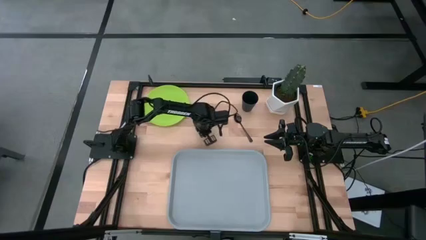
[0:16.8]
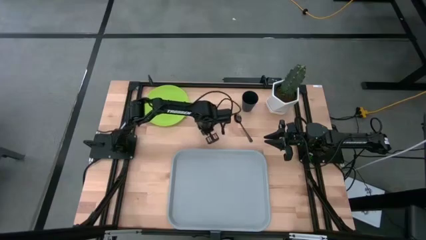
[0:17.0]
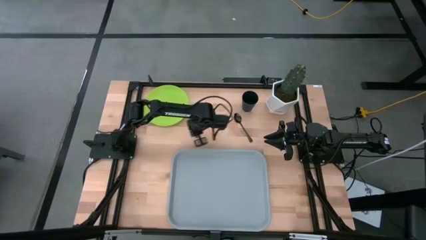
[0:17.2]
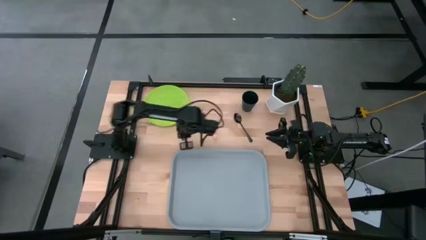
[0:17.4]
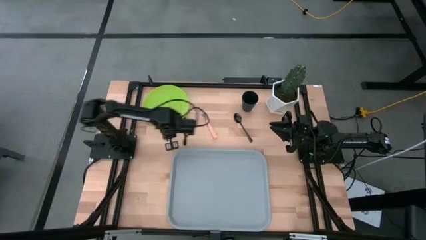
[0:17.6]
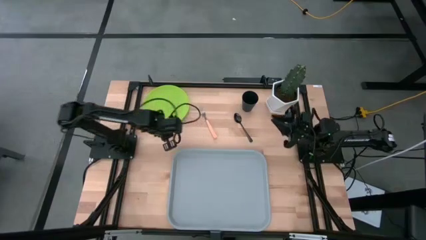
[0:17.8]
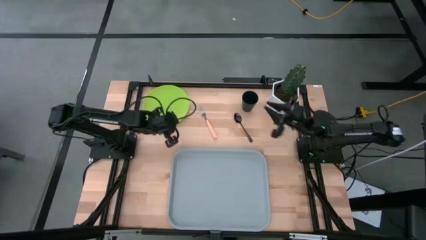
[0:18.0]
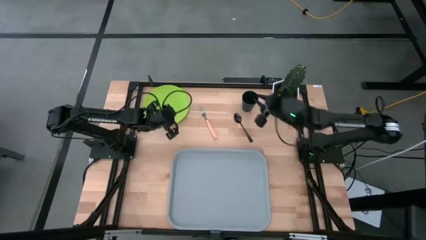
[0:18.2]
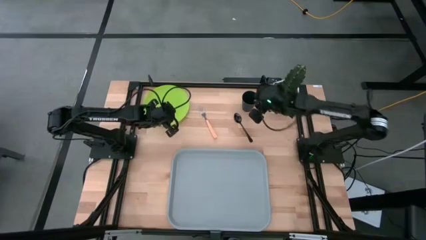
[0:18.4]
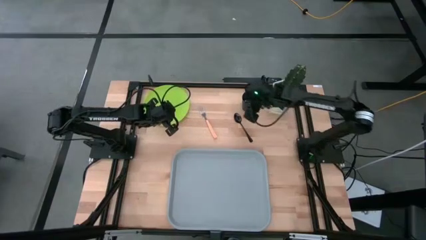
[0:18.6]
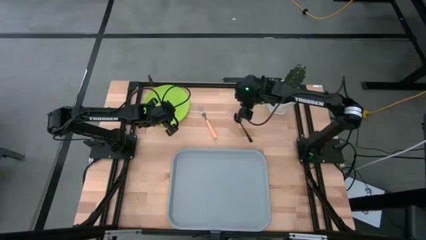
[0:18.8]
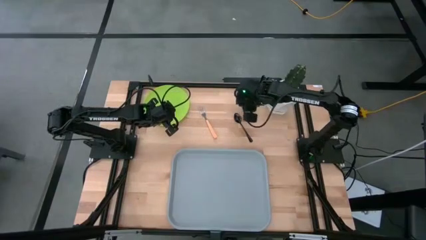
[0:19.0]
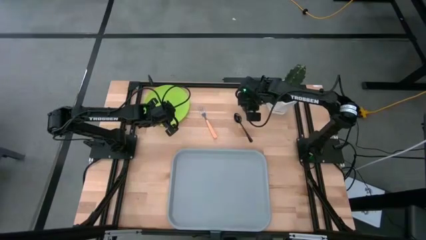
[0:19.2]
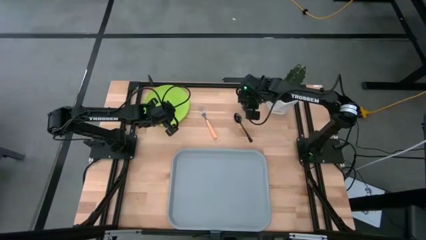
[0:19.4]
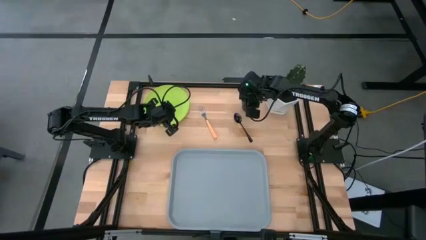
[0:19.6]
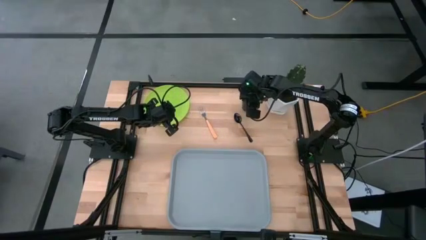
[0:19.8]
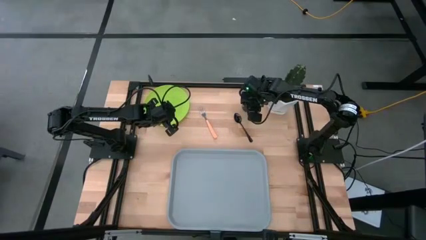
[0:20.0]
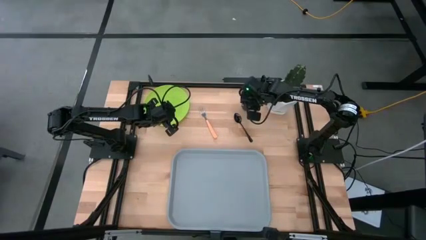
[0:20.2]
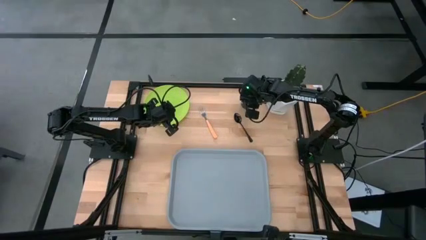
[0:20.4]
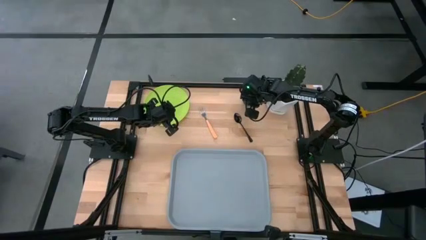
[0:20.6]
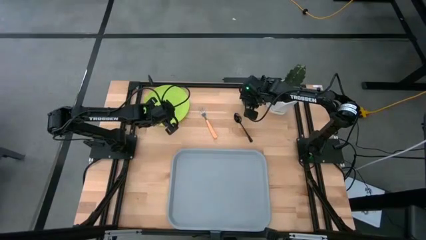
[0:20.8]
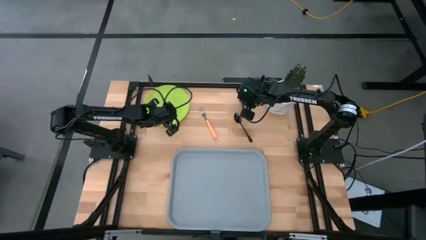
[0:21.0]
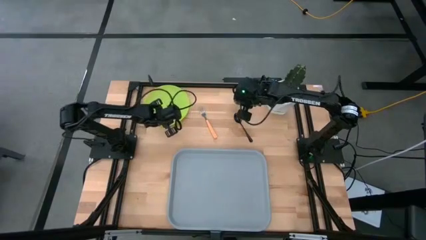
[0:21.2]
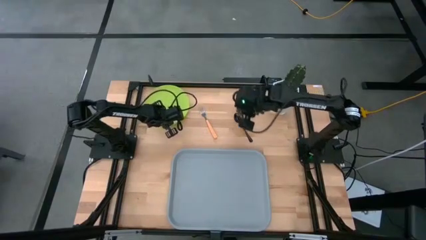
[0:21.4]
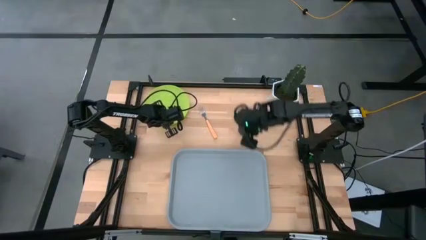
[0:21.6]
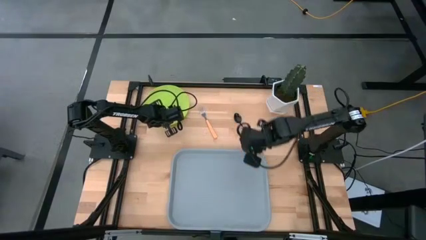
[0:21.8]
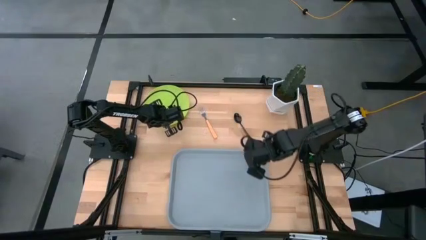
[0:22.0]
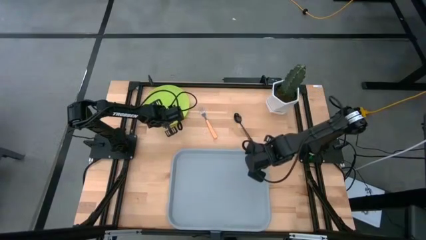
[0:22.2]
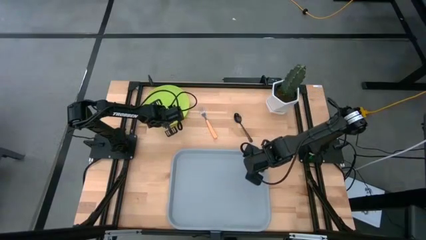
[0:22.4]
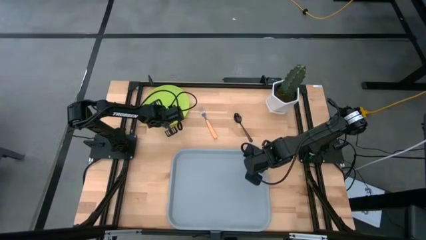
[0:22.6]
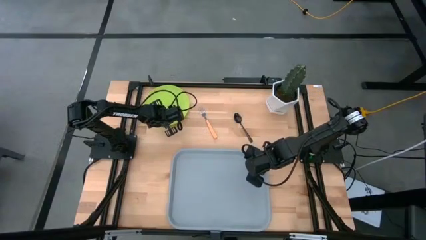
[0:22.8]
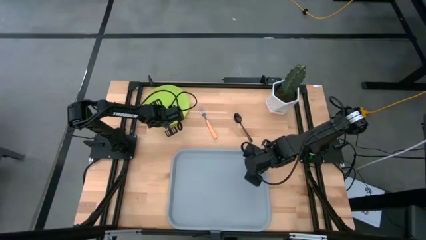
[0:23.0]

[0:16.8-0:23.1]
Task: Pick and place plate/cup/fork/spoon on tray
Put the black cup to the top left side of the gray tray

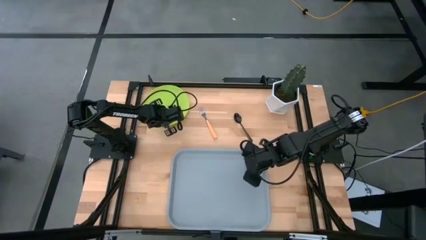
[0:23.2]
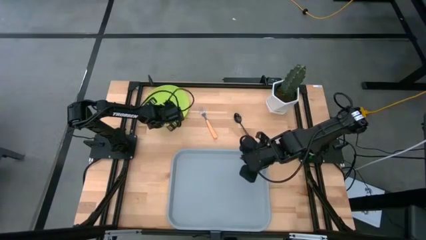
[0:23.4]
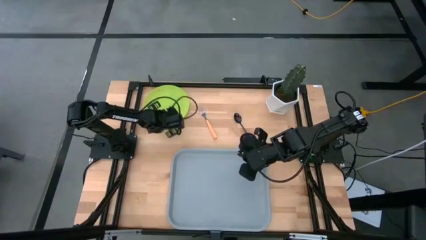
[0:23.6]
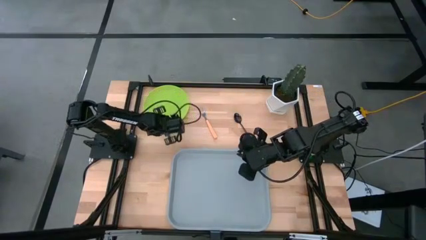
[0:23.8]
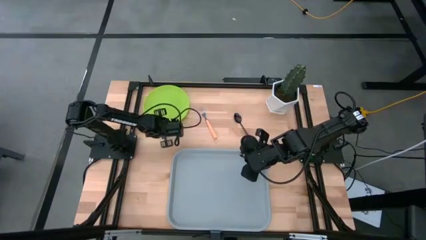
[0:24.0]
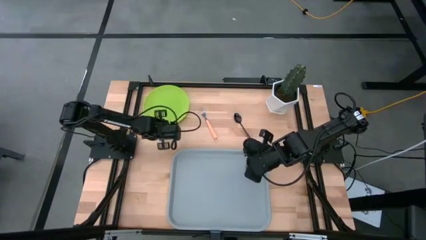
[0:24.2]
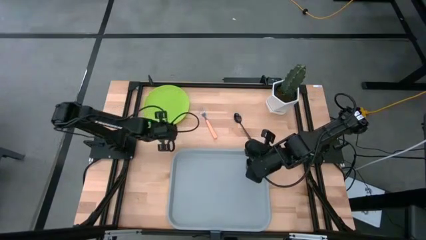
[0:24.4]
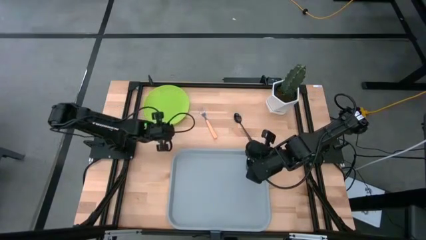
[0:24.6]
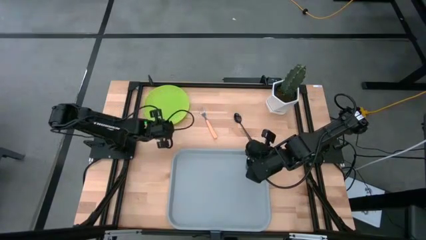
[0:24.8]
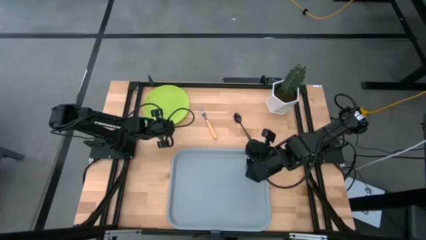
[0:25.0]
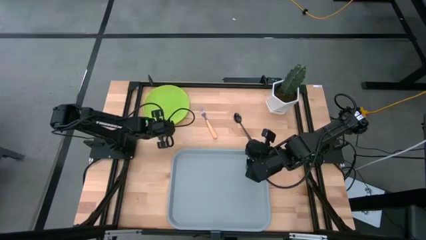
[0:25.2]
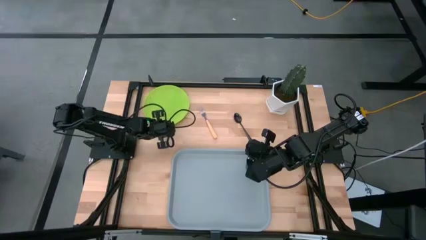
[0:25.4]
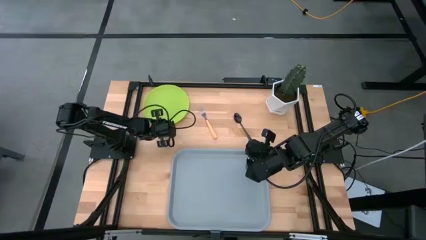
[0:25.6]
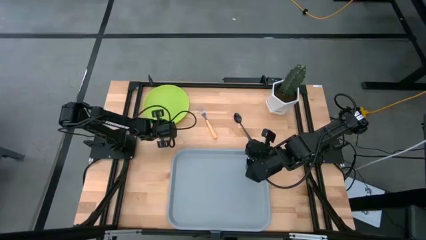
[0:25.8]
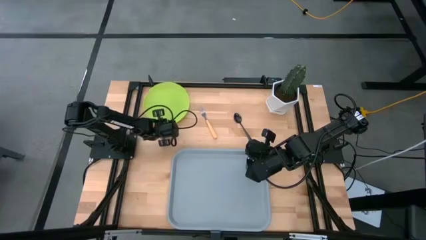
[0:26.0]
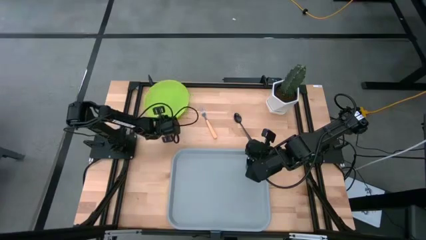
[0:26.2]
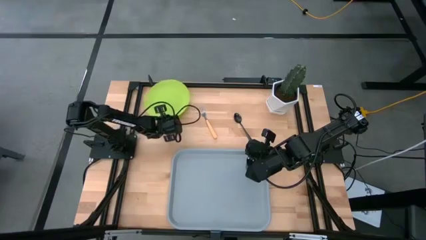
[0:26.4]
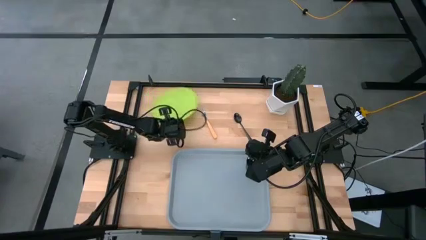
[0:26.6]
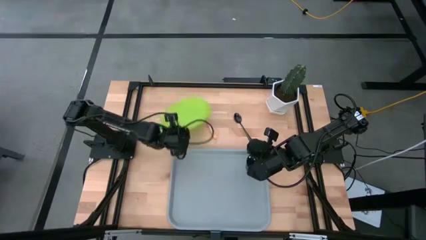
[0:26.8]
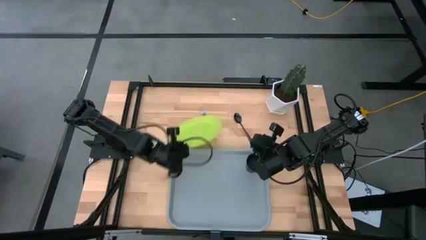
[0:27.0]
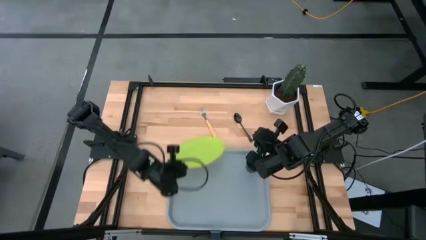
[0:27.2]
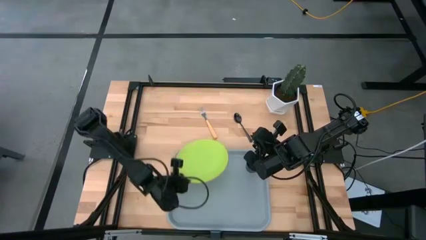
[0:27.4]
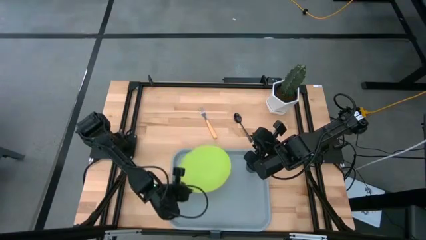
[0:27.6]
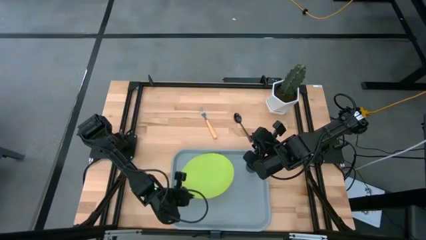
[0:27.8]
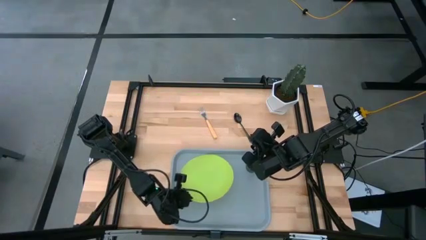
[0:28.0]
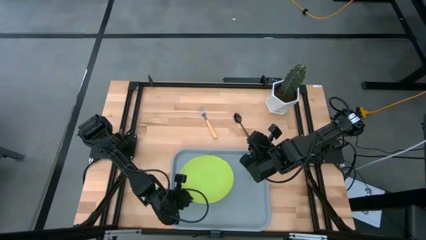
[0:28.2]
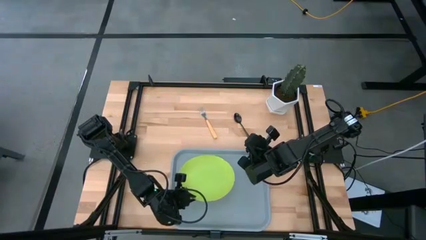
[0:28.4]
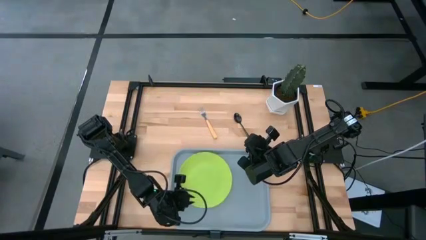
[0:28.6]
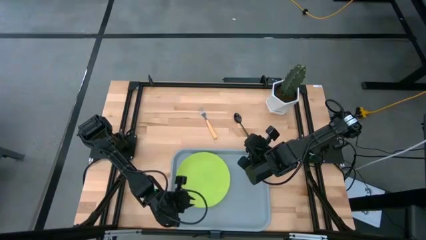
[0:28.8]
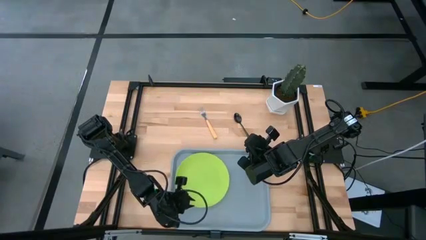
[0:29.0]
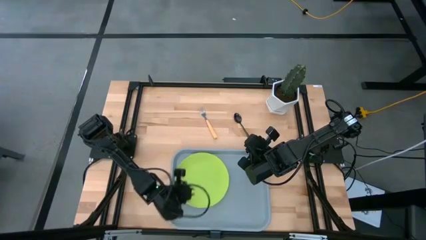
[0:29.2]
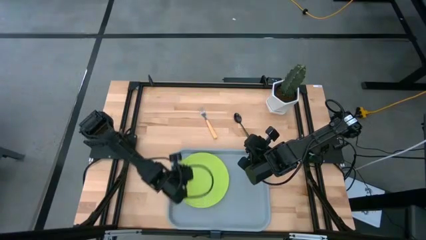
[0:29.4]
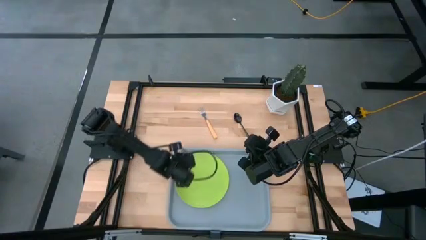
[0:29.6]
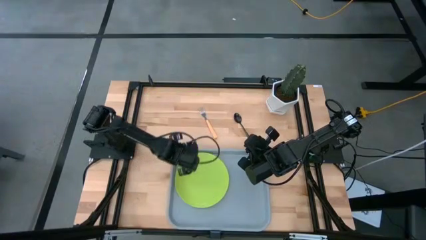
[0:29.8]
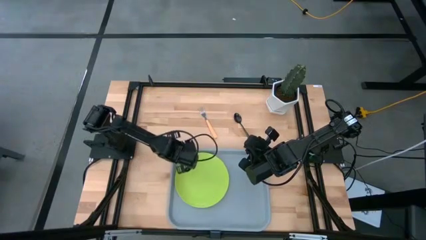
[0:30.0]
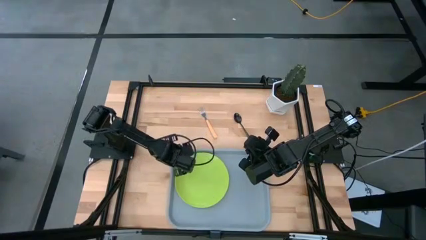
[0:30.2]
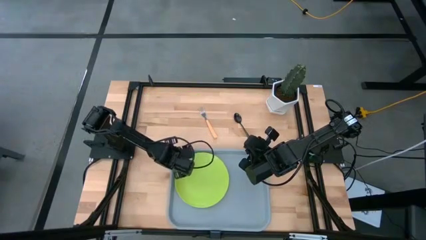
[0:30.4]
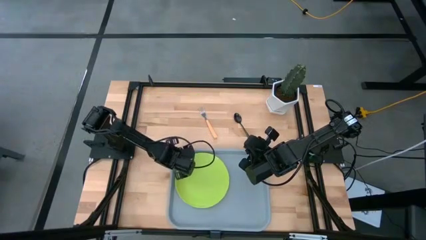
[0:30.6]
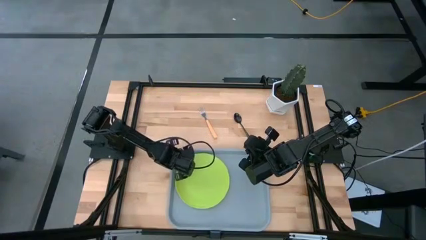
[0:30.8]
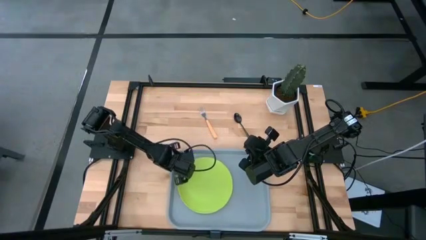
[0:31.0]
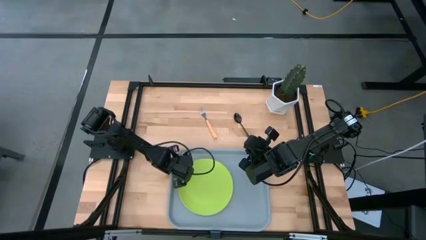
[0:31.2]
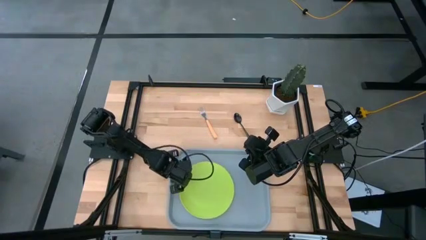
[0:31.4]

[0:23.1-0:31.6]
Put the green plate on the left side of the gray tray
